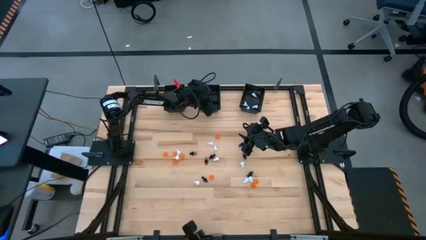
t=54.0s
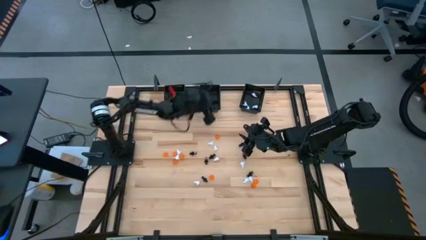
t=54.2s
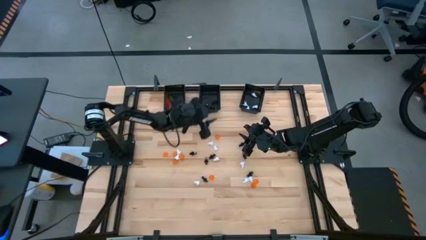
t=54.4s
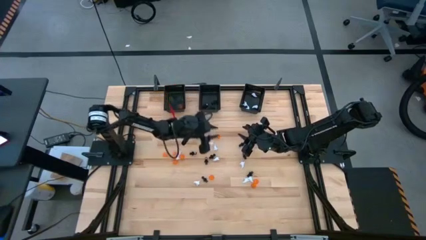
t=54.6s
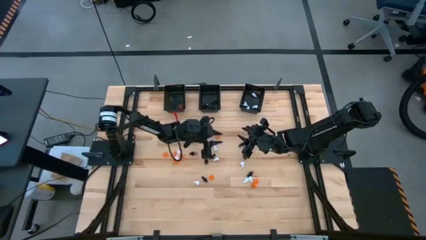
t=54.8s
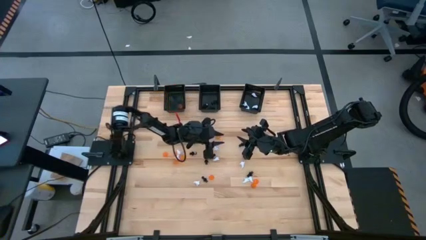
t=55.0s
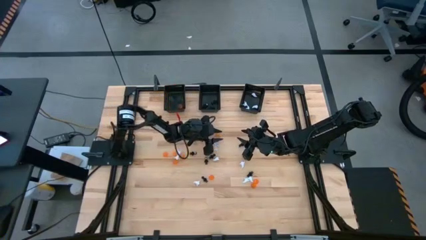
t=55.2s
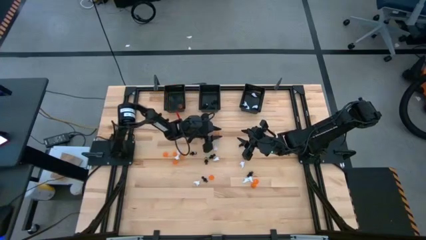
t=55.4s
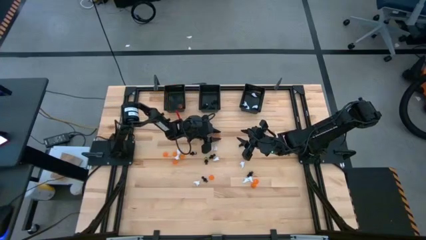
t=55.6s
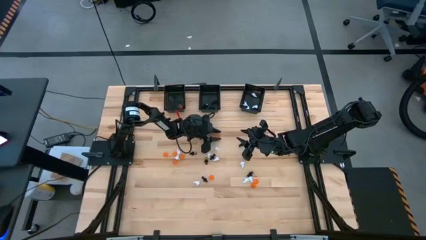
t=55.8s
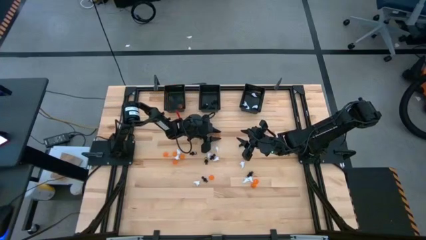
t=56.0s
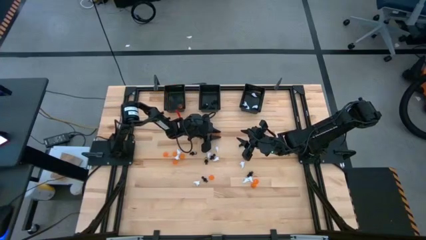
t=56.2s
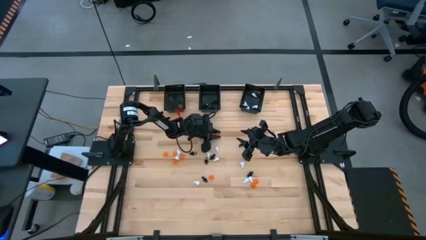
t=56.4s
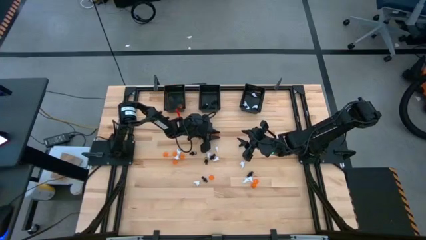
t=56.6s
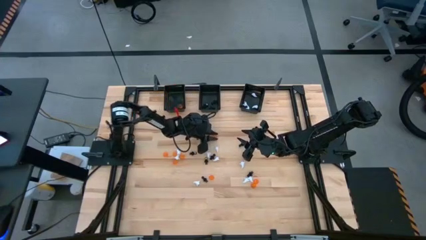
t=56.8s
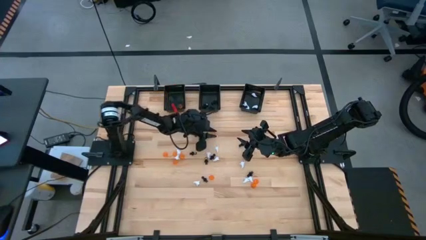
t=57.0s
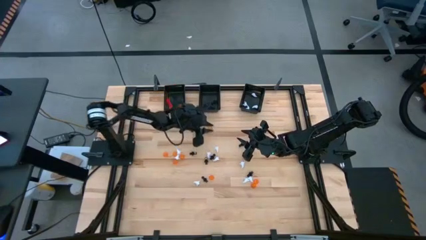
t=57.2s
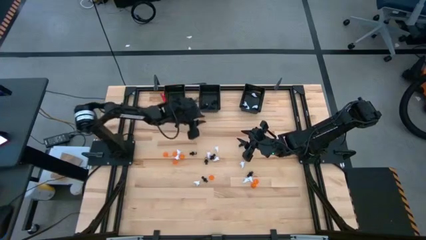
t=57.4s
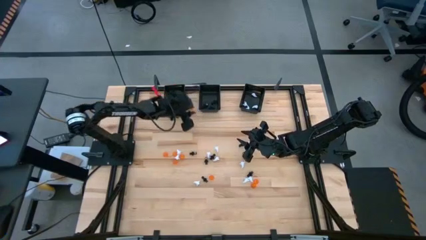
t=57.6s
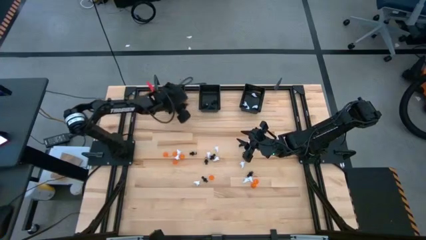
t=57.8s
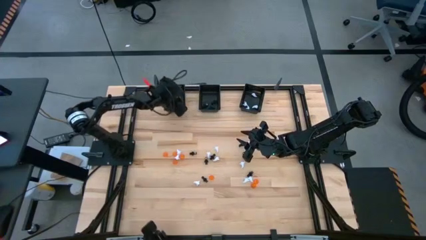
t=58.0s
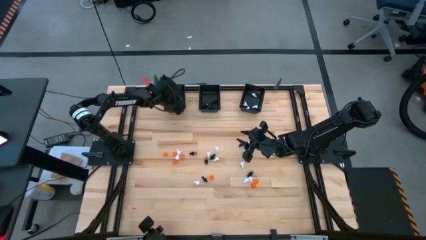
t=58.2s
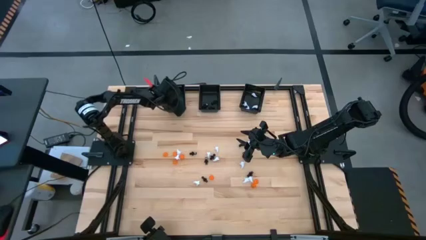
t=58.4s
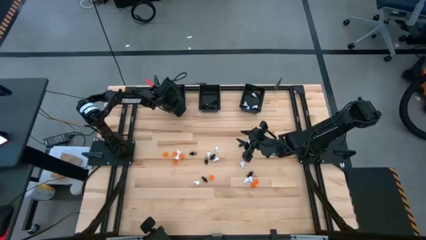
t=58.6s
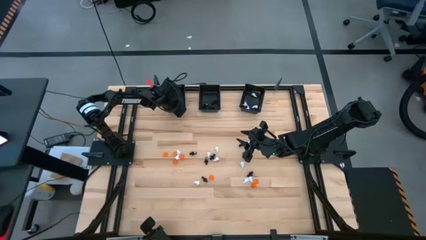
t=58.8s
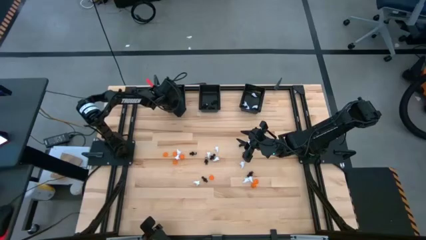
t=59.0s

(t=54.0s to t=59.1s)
Task: Sort Halloween decoration
Put the orange pumpkin toy into the left black basket

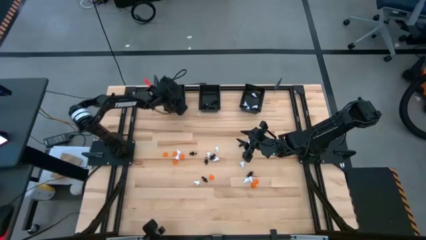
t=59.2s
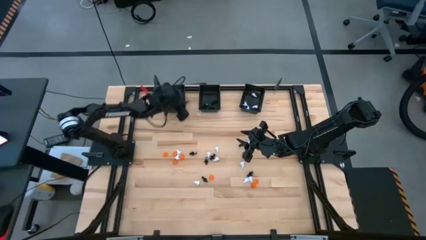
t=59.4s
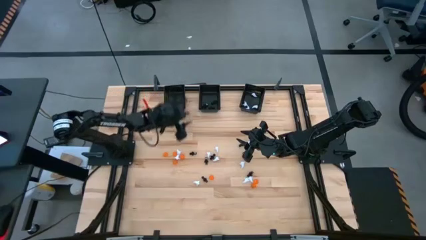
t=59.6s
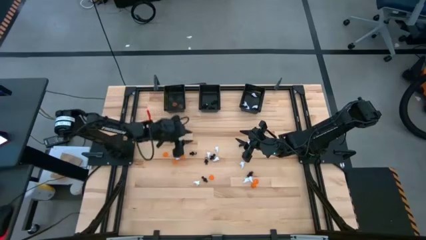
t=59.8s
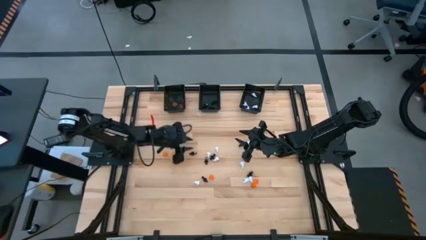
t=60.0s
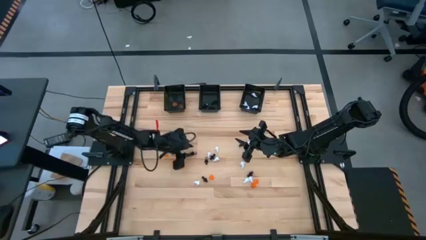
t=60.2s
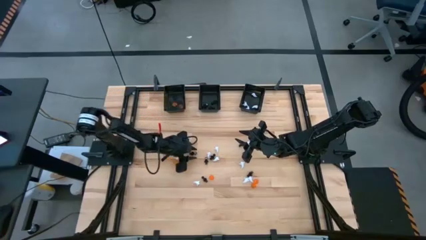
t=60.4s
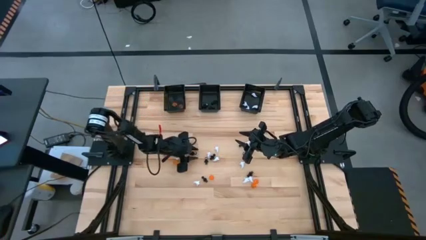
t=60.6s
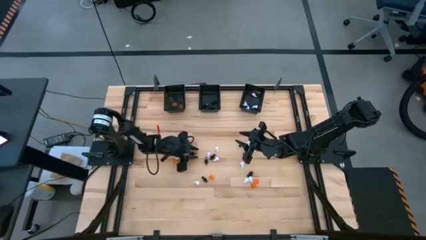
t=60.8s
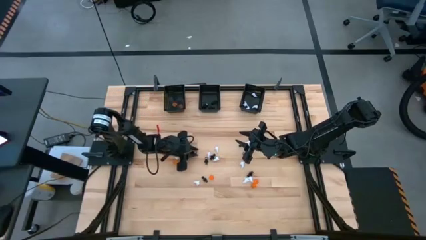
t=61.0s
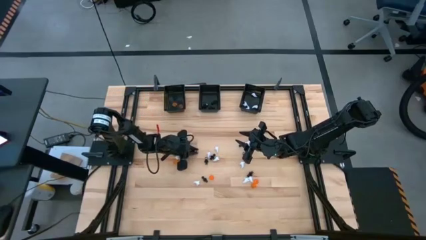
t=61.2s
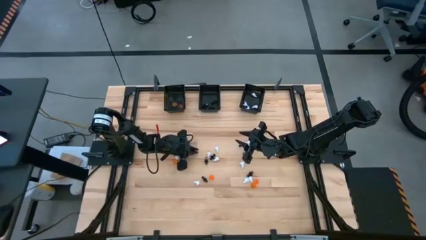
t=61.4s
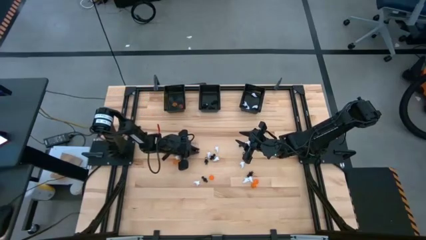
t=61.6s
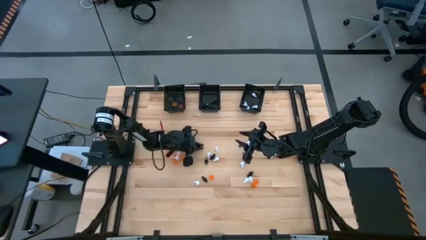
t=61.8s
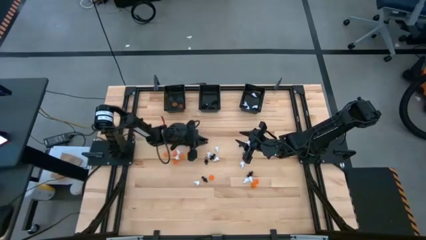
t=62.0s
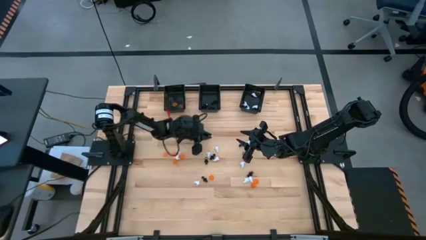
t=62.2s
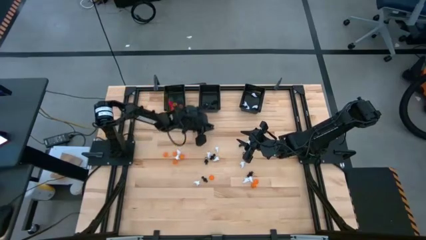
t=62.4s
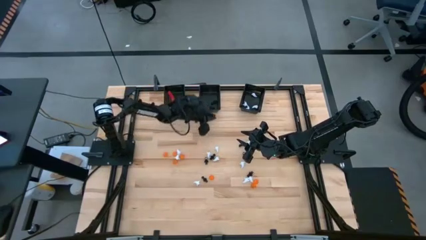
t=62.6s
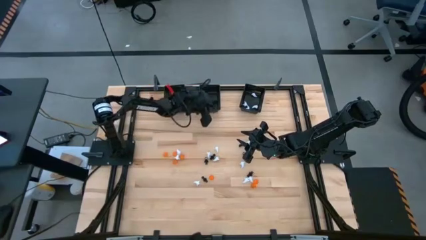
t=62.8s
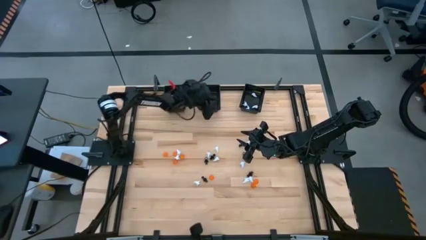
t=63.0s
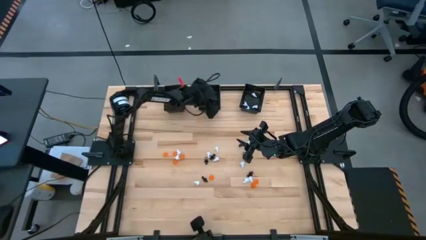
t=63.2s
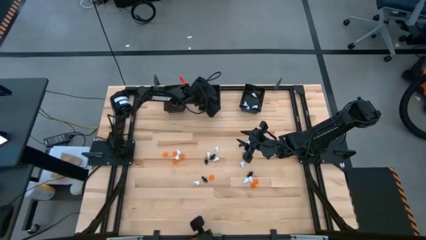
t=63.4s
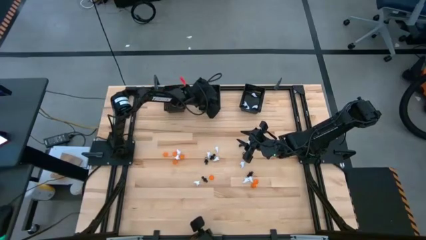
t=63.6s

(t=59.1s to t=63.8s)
Put the black skeleton toy into the black middle basket

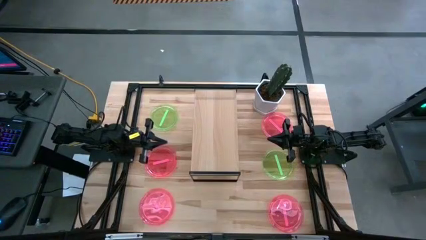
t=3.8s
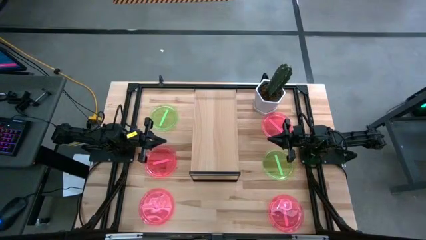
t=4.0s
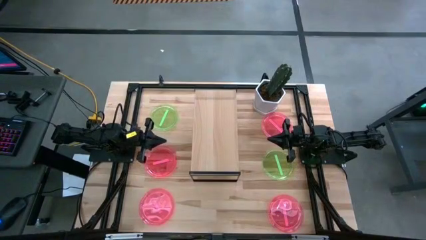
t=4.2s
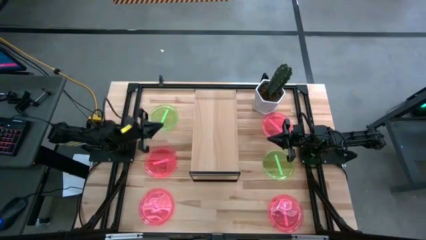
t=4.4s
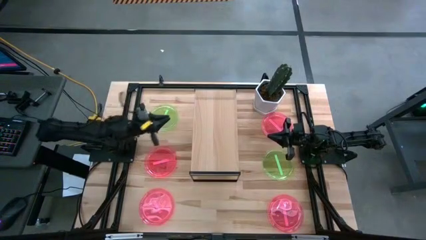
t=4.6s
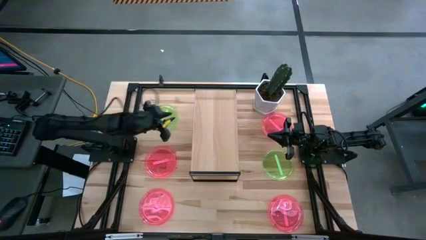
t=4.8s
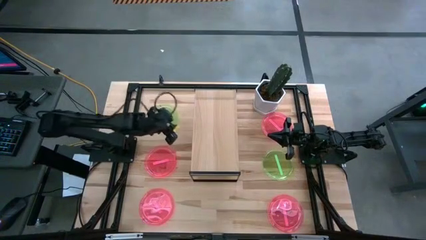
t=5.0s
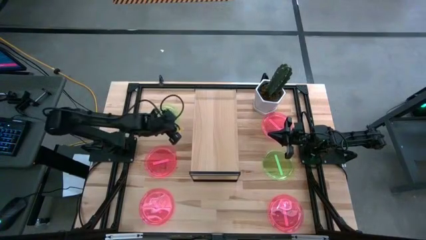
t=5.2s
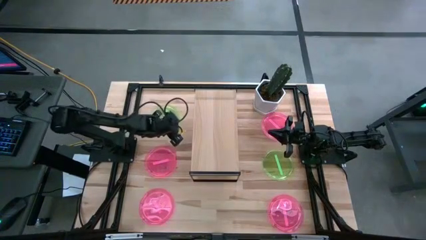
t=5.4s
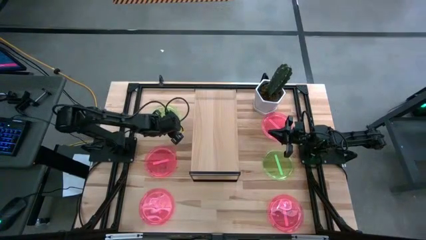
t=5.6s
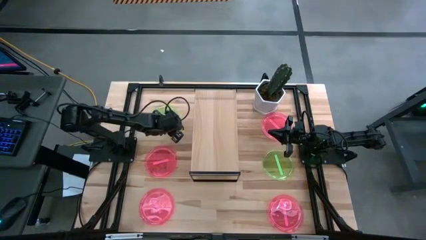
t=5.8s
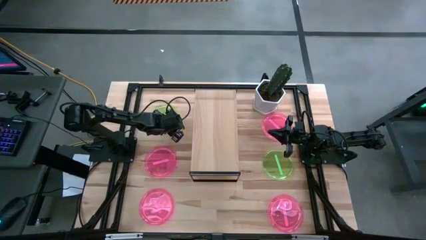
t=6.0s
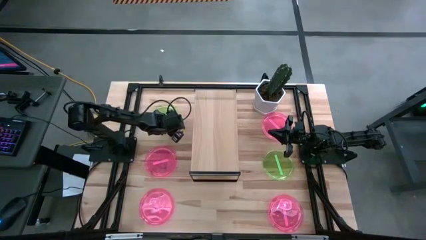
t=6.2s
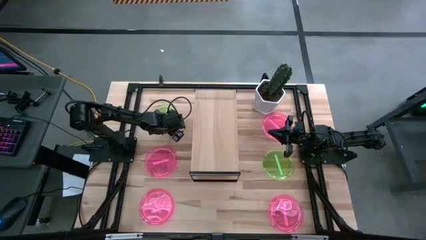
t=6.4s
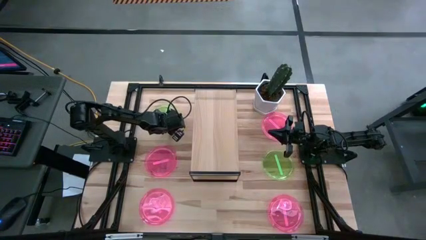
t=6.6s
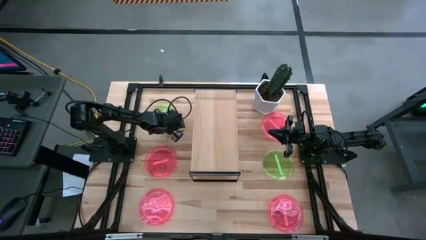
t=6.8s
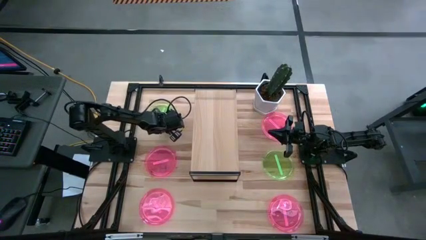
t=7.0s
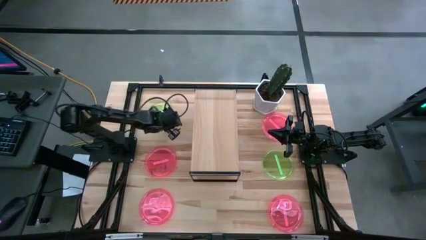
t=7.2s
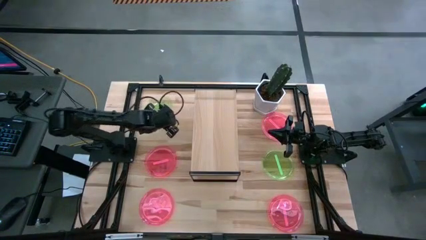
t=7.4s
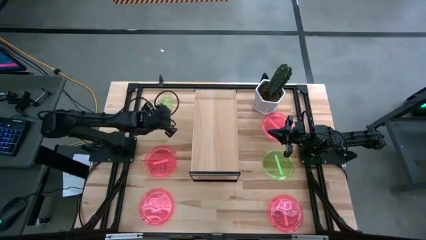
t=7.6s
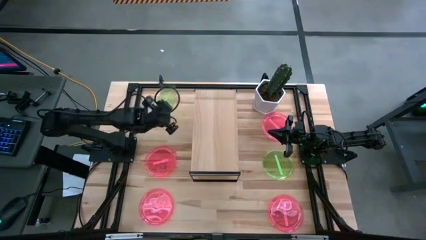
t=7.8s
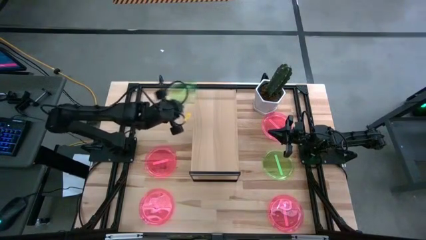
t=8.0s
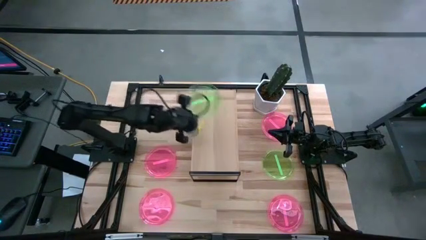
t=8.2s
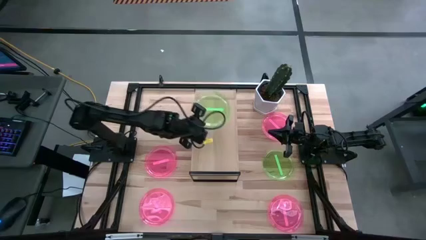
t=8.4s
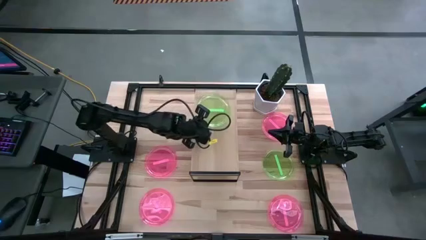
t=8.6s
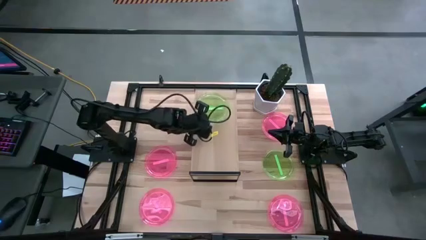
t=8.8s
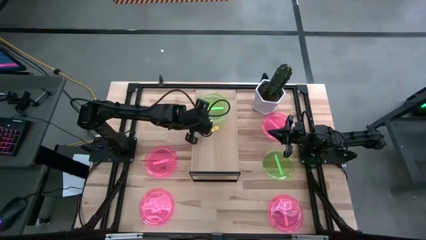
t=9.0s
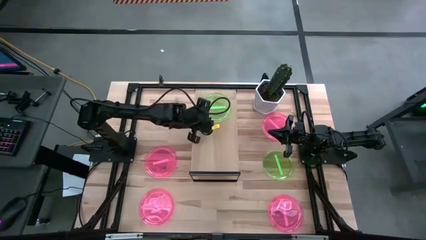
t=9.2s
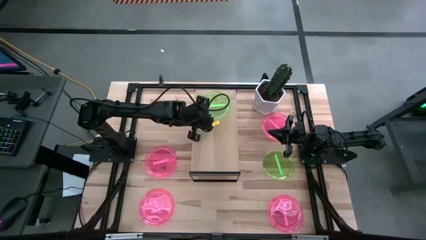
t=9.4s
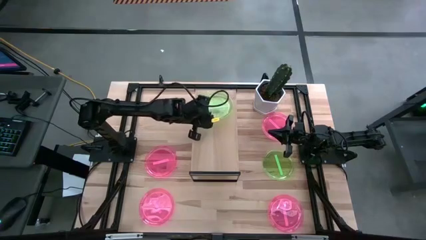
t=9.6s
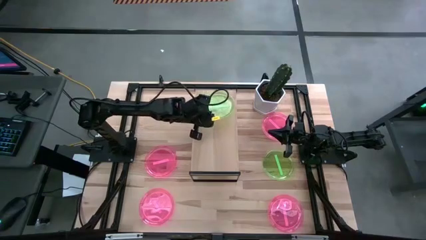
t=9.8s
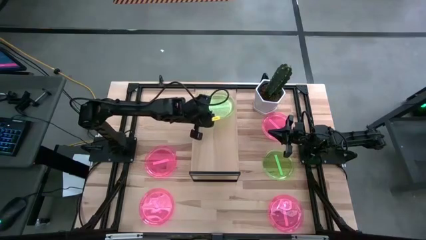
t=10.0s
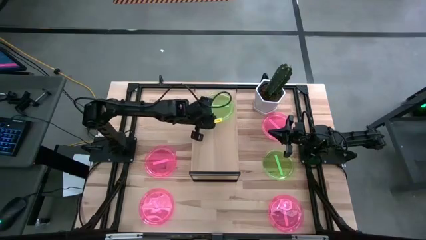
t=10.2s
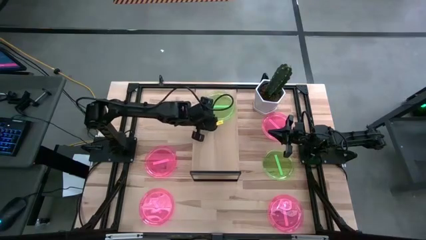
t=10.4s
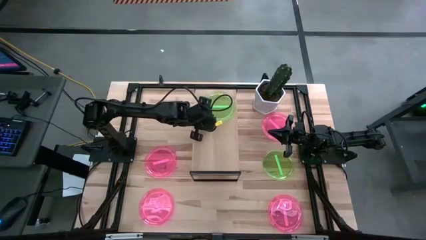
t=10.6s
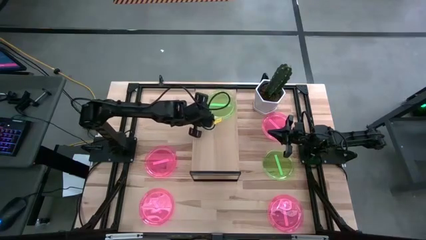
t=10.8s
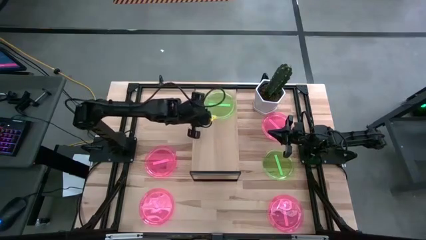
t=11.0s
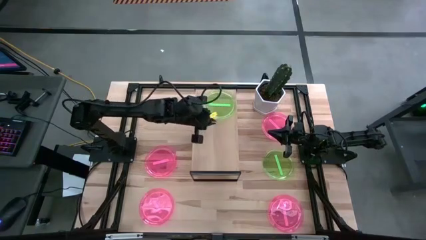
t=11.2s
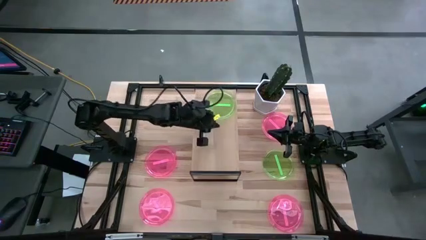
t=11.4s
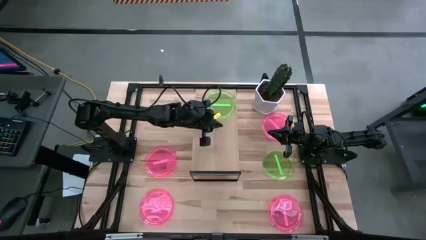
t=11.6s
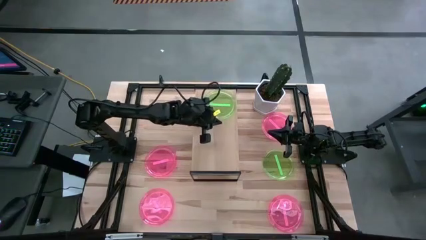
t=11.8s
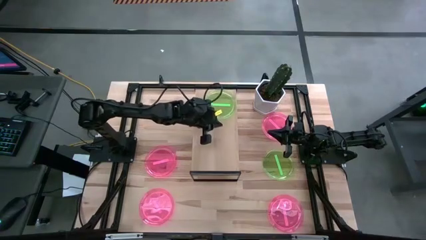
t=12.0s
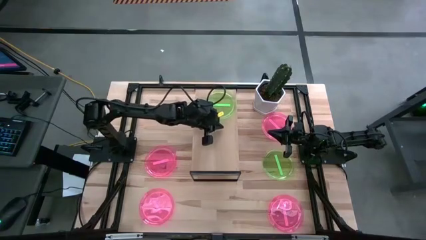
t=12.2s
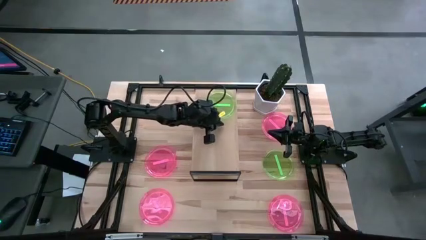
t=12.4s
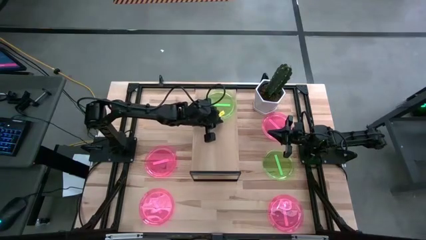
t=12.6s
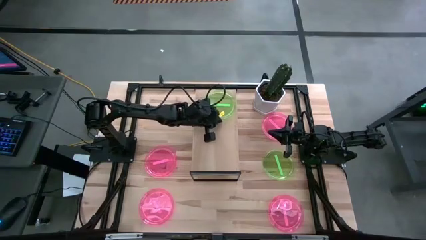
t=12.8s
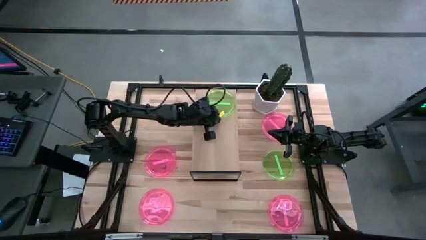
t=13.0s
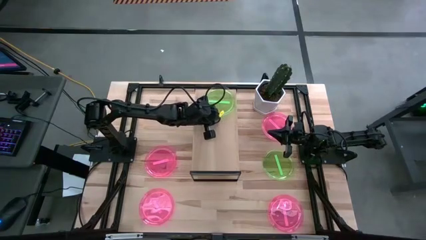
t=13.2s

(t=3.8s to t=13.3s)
Task: Place and stack plates onto a shelf
Put the green plate on the shelf
